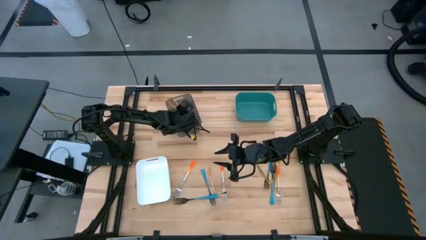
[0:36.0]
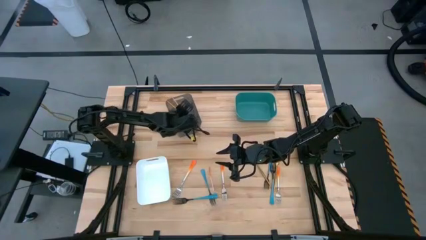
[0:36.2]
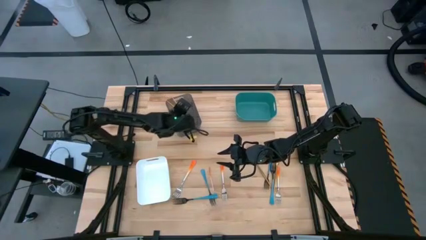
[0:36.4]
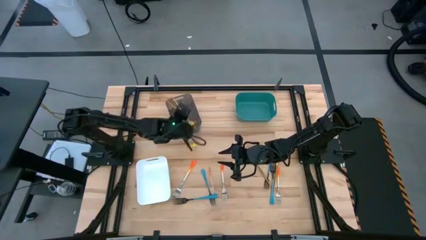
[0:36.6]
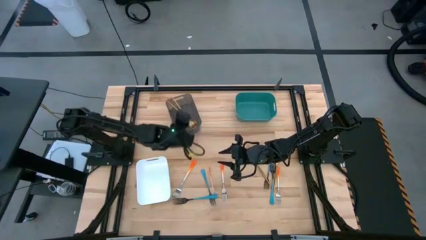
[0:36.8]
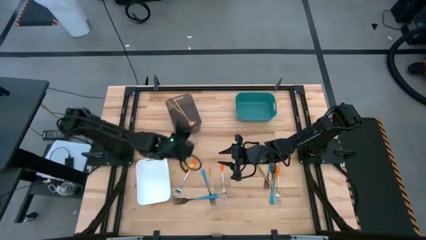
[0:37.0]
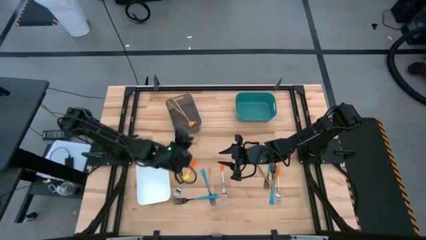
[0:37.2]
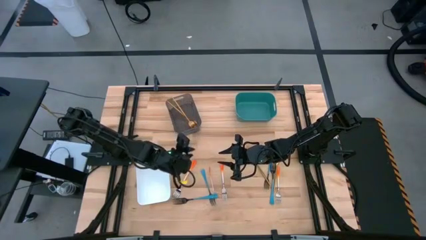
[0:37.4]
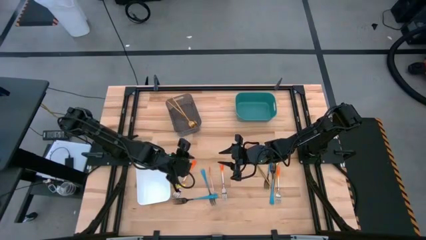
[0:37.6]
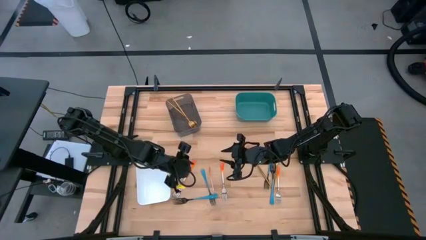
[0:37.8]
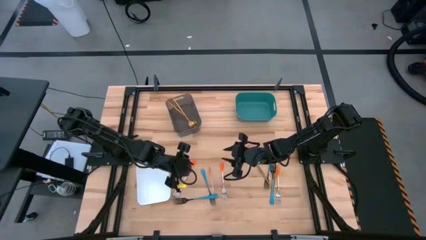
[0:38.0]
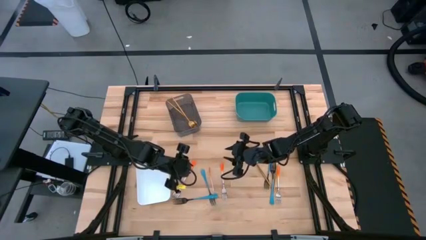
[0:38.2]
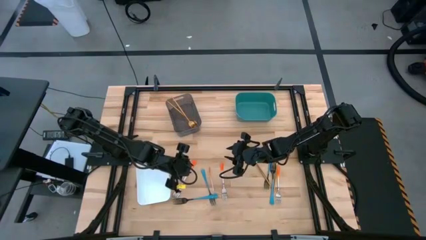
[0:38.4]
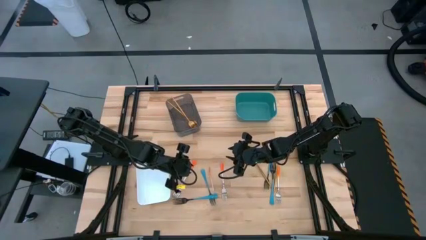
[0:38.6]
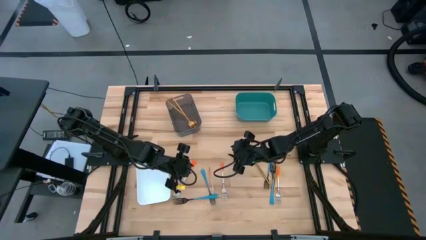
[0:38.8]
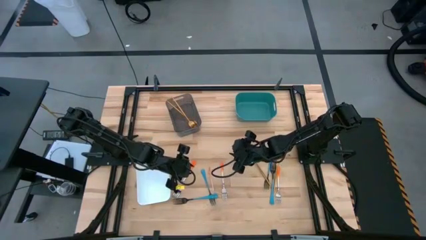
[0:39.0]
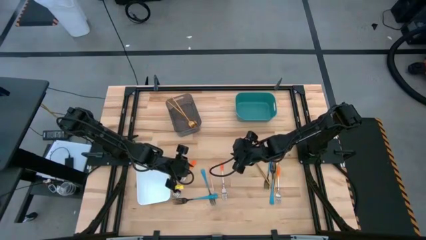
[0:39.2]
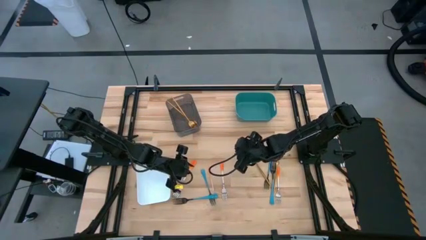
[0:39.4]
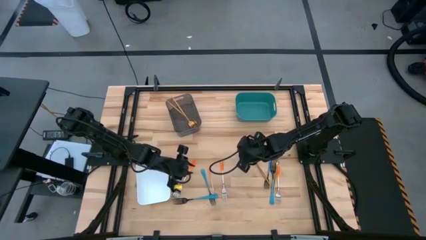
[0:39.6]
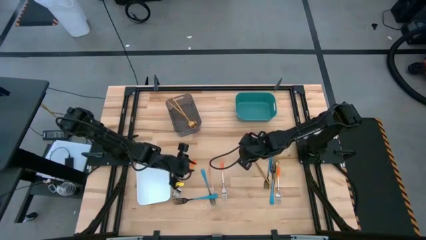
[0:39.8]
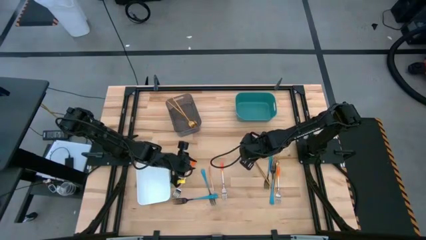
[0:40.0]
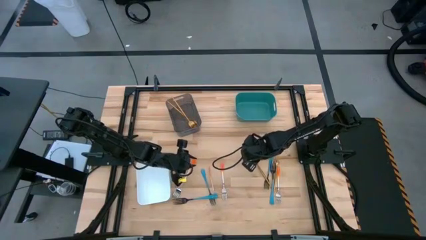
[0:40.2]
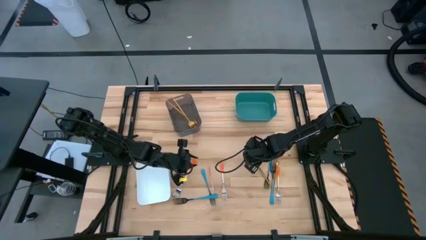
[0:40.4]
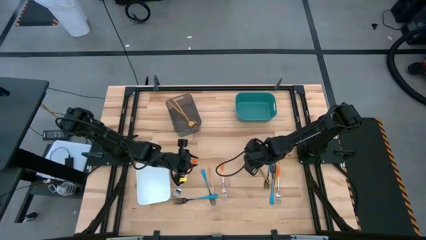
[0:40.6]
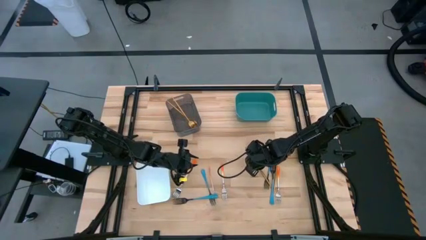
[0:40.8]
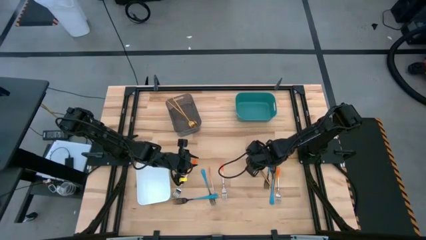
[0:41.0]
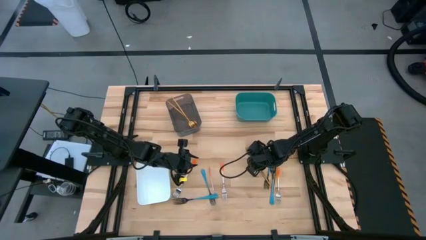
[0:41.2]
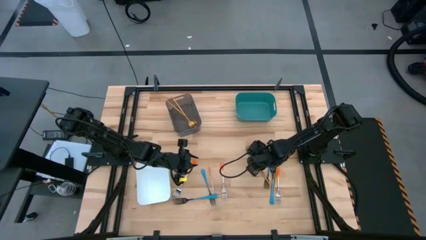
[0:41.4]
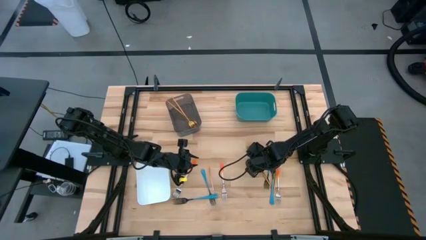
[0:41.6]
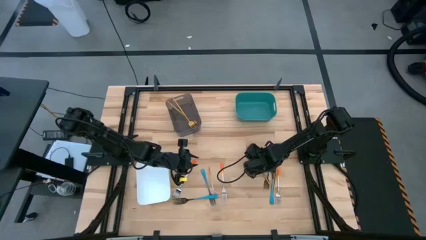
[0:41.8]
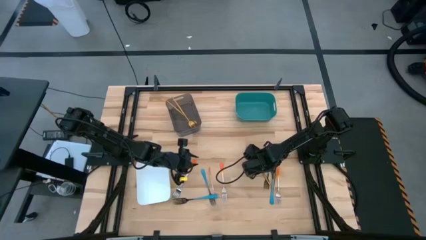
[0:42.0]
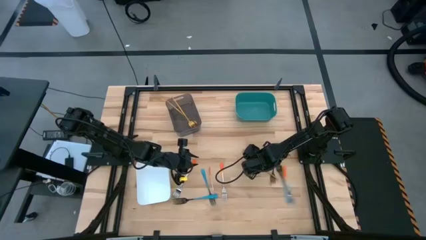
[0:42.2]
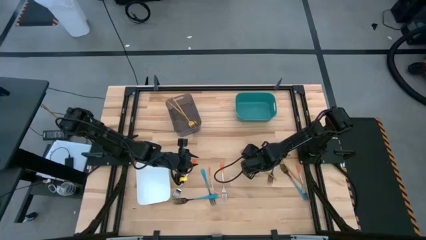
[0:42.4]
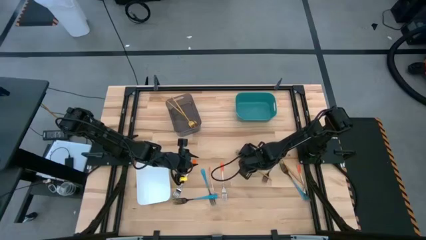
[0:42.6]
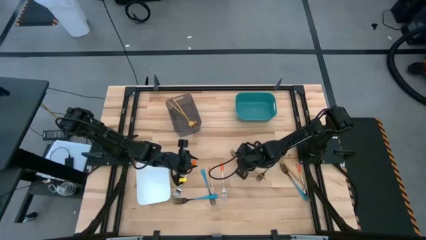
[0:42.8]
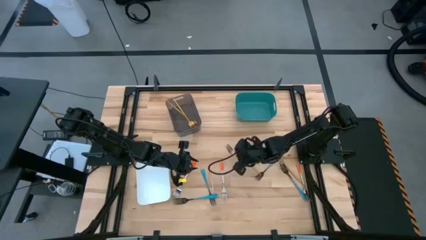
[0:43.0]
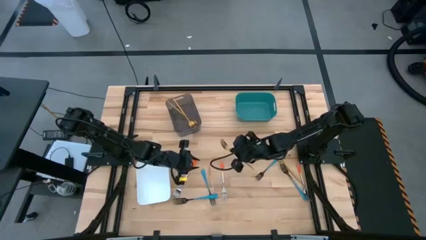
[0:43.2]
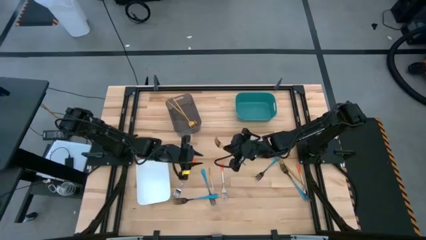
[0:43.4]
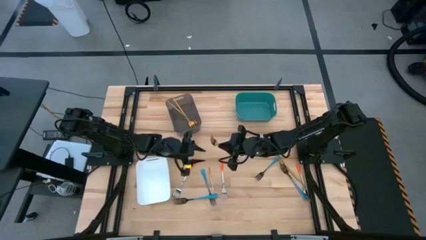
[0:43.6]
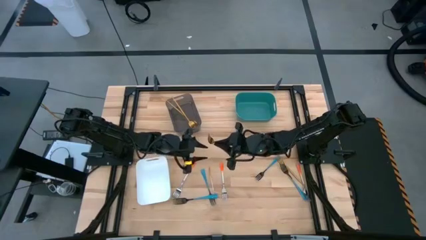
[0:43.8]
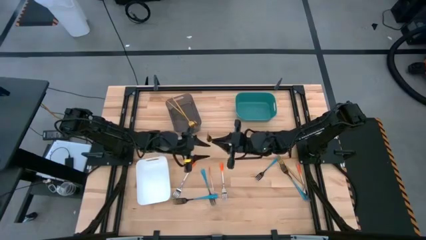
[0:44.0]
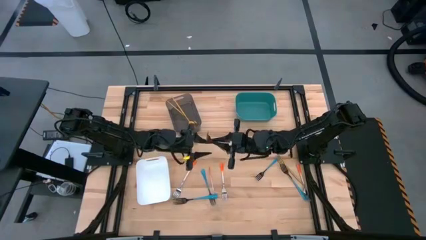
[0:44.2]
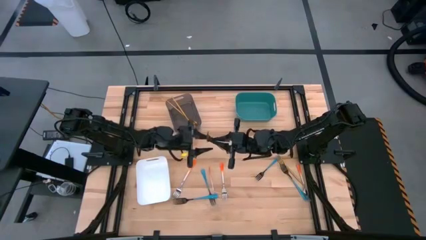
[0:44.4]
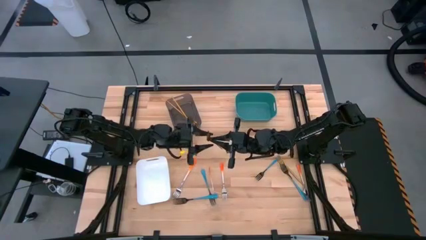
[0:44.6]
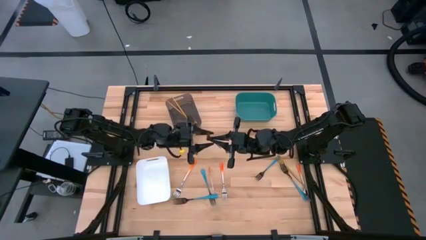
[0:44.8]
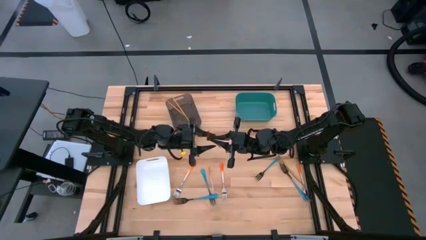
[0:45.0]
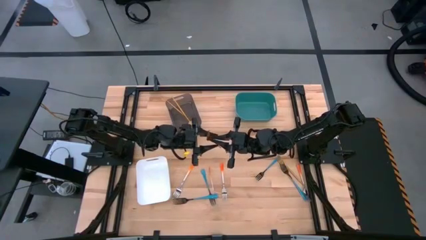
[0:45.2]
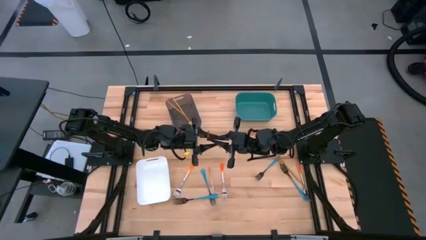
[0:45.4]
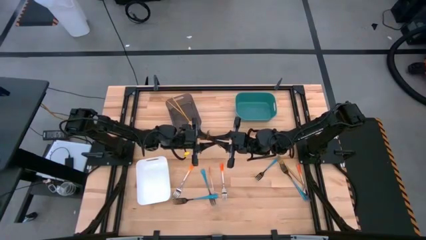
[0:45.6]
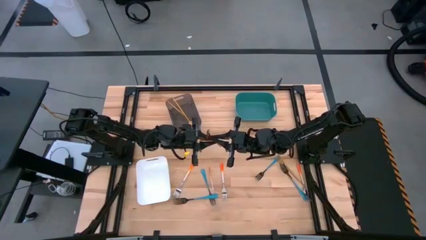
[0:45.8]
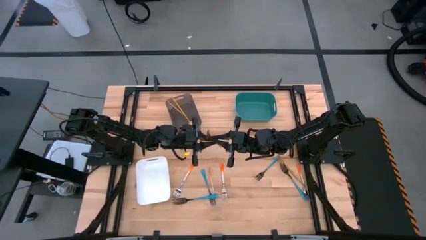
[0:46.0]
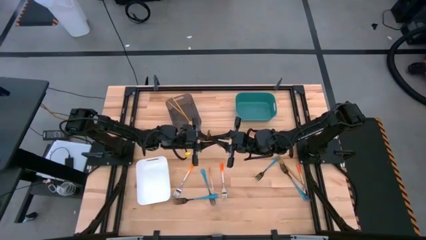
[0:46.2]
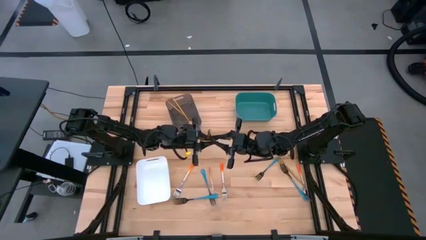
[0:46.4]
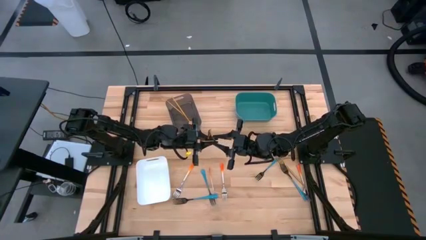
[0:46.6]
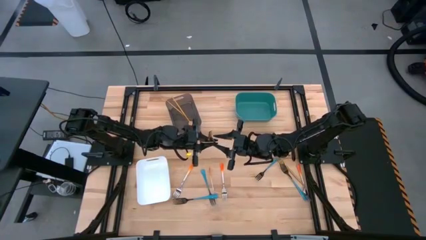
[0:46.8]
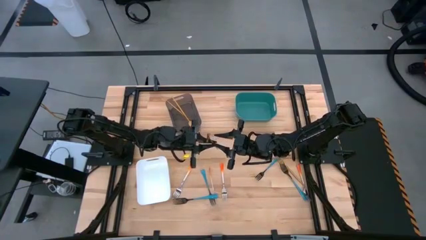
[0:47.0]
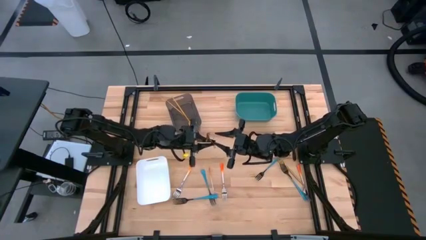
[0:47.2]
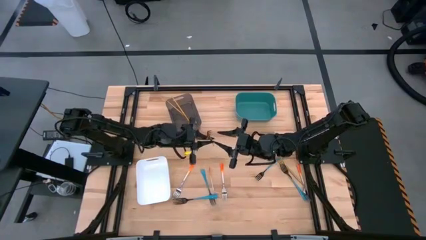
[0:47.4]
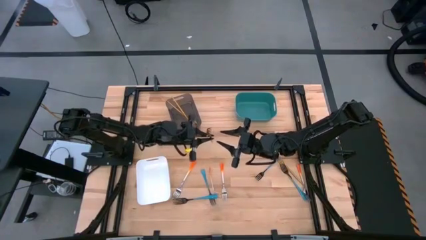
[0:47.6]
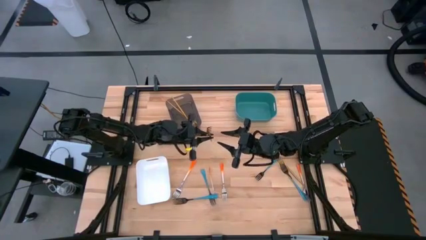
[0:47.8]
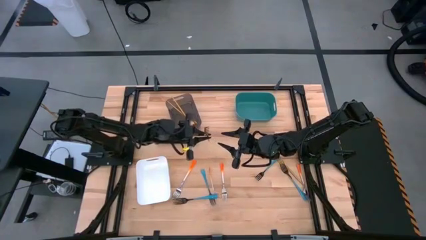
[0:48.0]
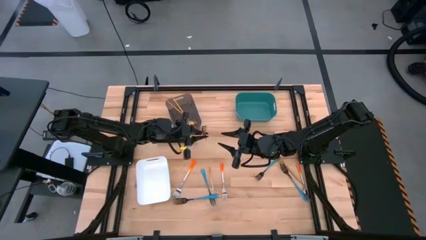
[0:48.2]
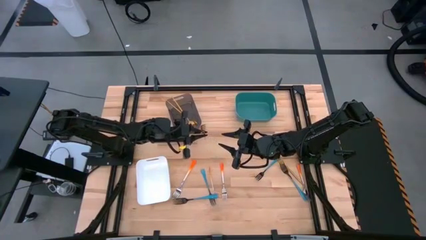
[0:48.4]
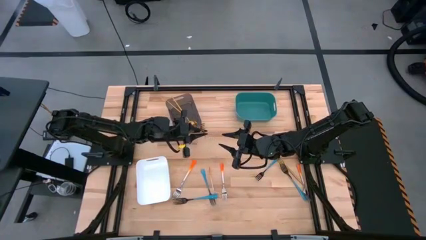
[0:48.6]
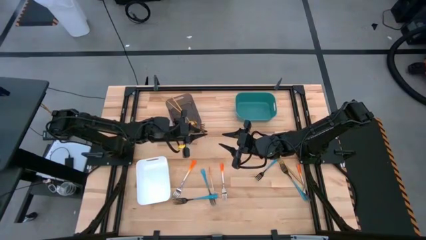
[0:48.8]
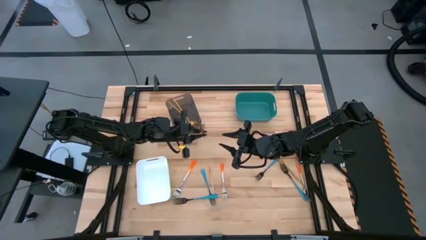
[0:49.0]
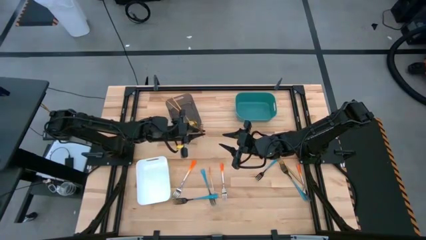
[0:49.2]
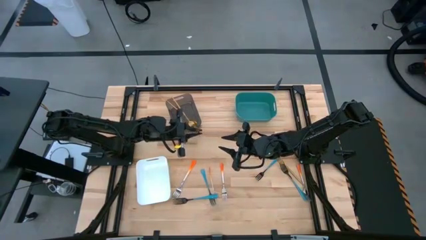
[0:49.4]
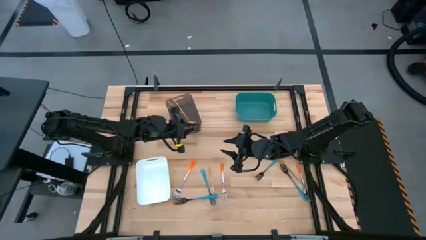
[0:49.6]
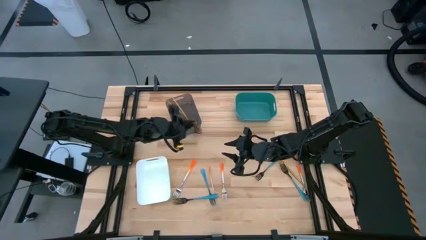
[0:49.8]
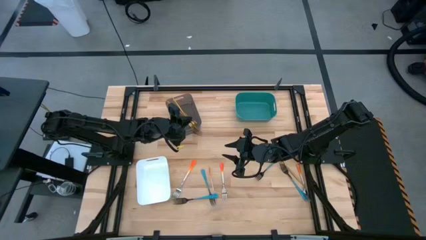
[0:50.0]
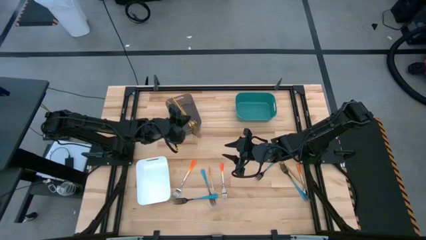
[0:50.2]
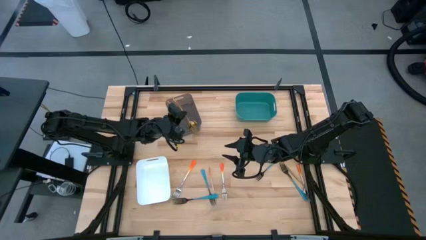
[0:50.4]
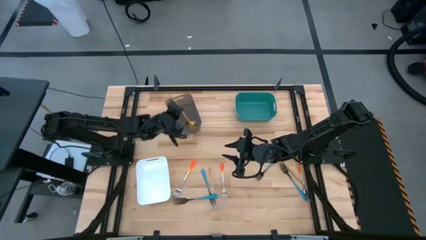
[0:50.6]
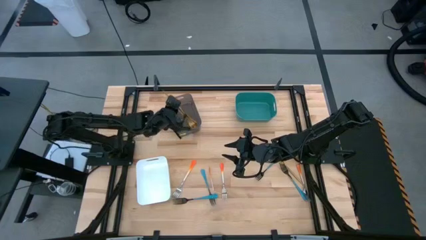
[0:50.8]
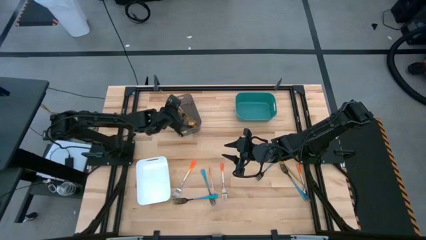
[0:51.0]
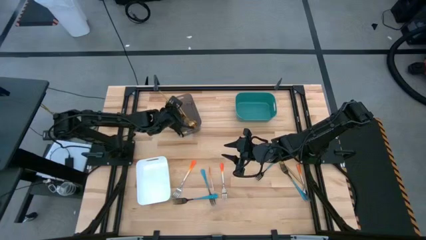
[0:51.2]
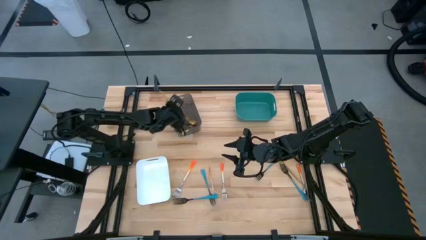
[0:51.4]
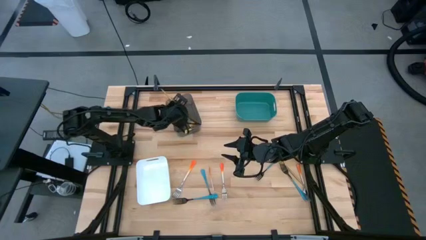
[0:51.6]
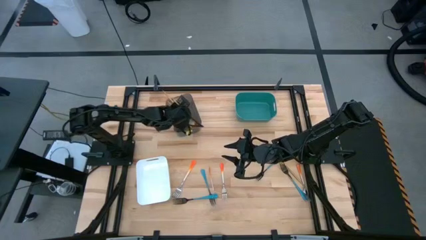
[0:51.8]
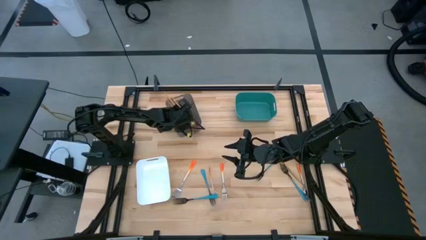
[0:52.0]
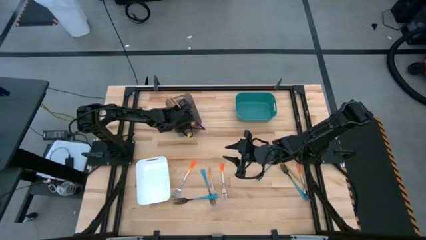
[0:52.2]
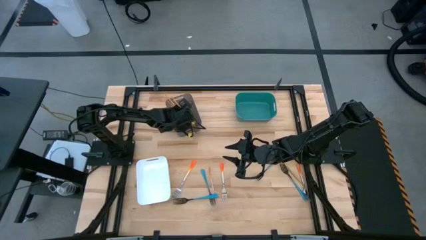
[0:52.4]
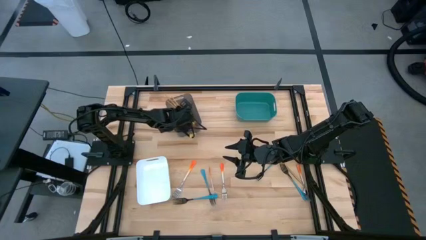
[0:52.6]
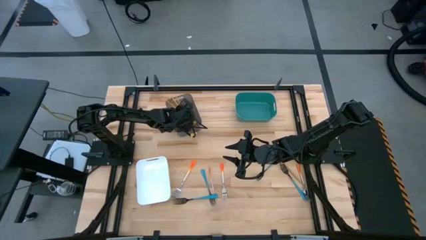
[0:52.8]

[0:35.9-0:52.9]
Task: Sort silverware by color (type)
Put the gold fork into the black bin
